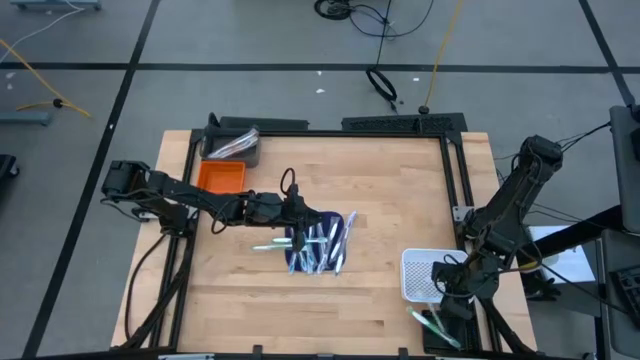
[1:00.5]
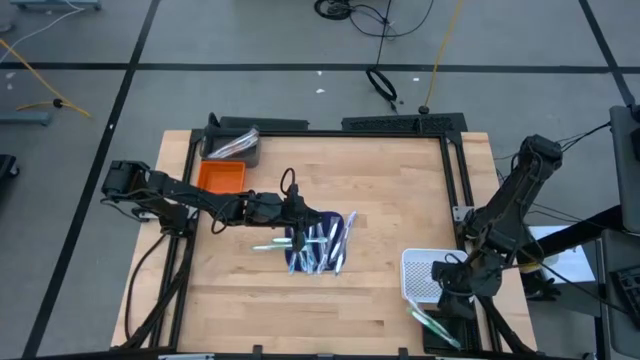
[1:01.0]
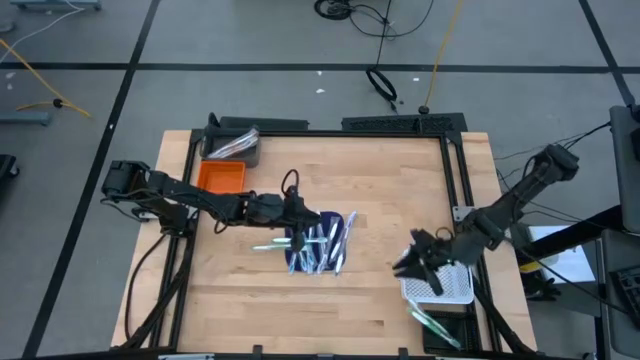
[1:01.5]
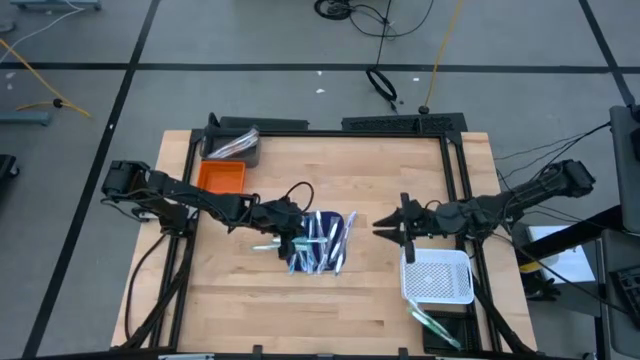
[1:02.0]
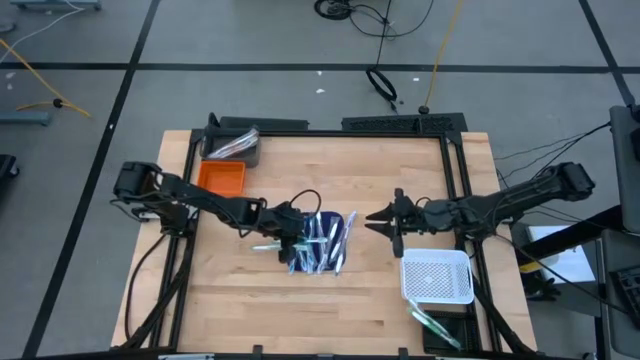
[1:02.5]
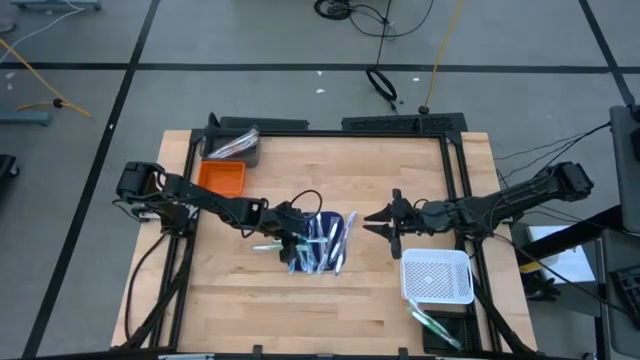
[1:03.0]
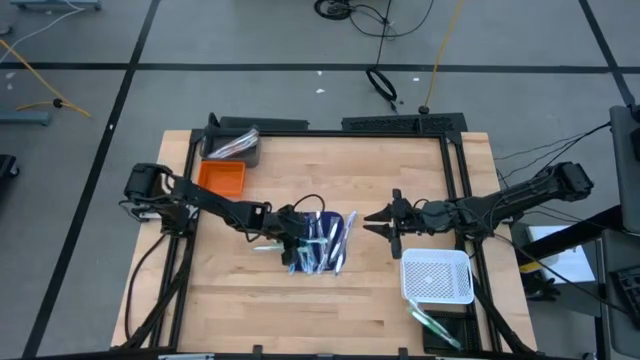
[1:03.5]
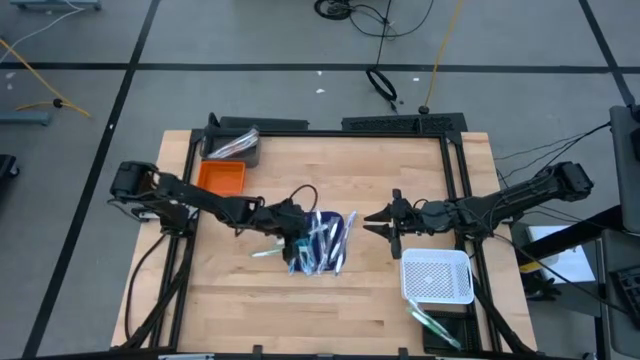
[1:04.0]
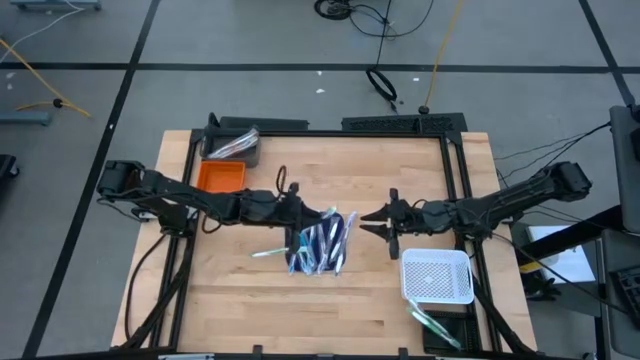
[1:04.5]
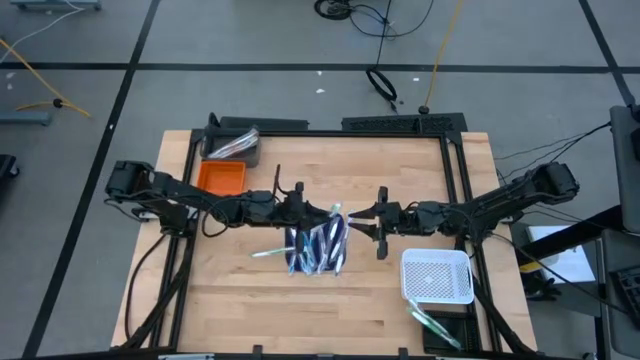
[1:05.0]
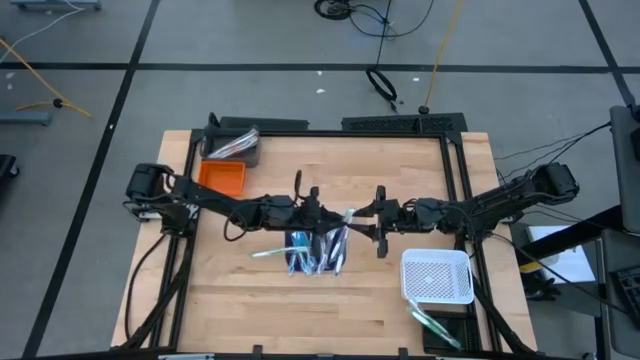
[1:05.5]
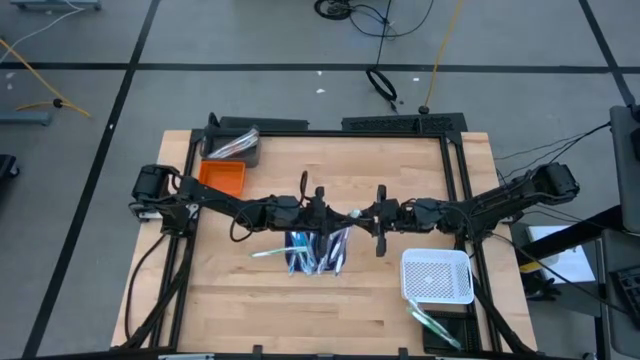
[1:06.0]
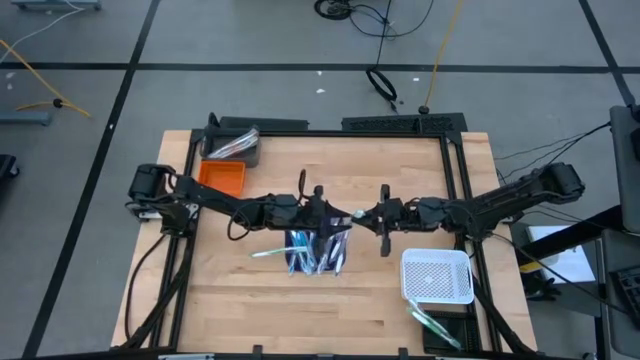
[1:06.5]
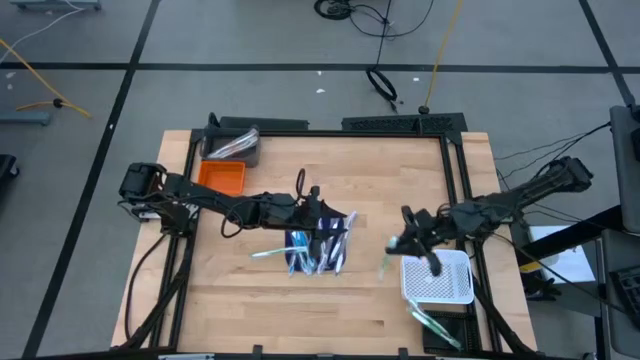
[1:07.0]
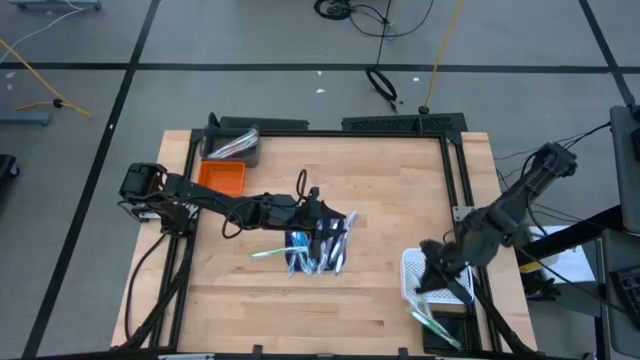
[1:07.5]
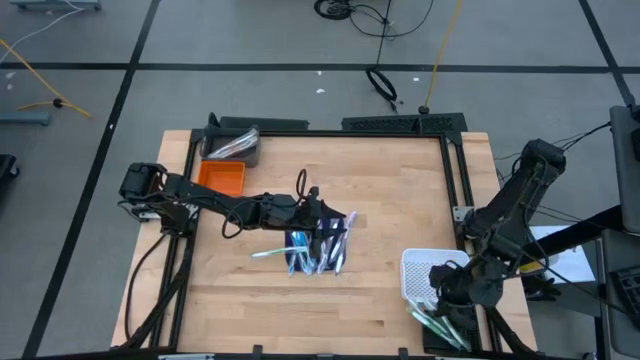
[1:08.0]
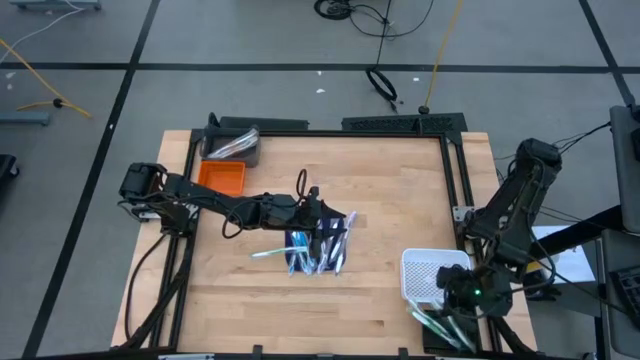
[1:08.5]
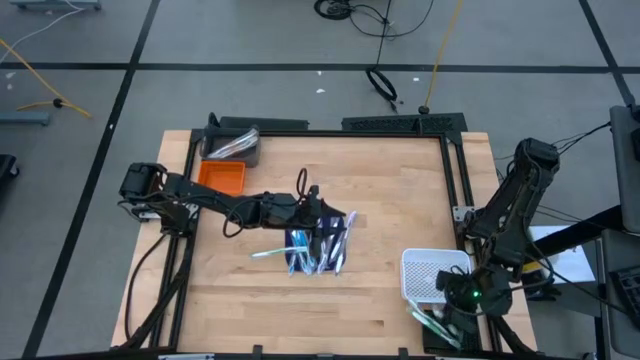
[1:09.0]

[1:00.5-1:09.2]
Task: Pick & Place Toothbrushes
Put the green toothbrush into the black bin

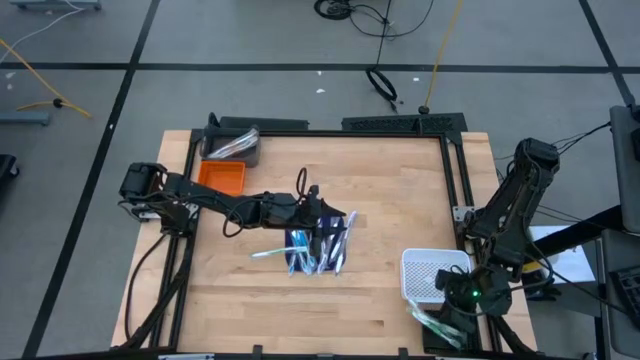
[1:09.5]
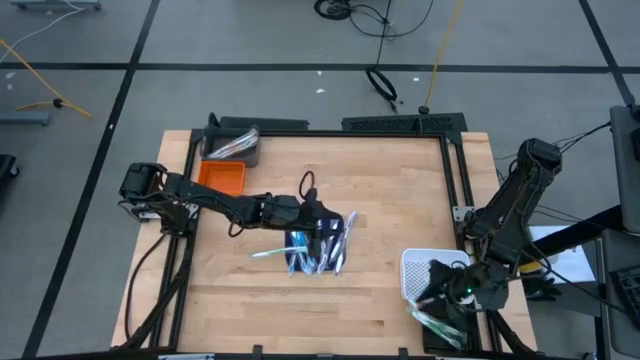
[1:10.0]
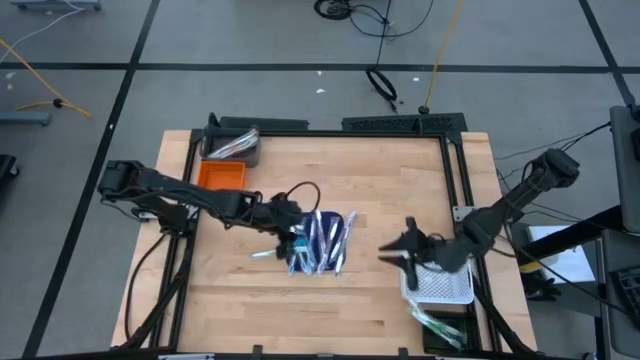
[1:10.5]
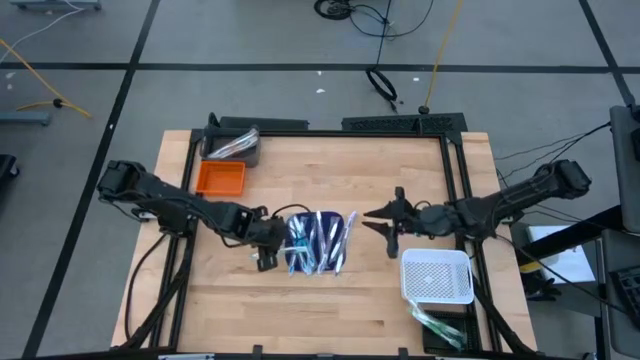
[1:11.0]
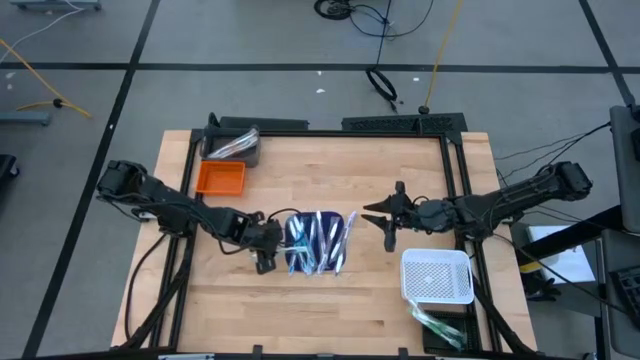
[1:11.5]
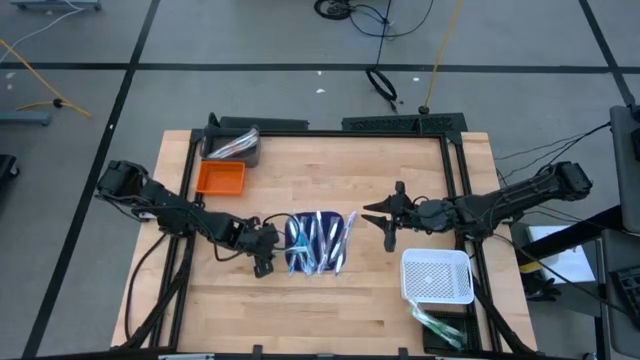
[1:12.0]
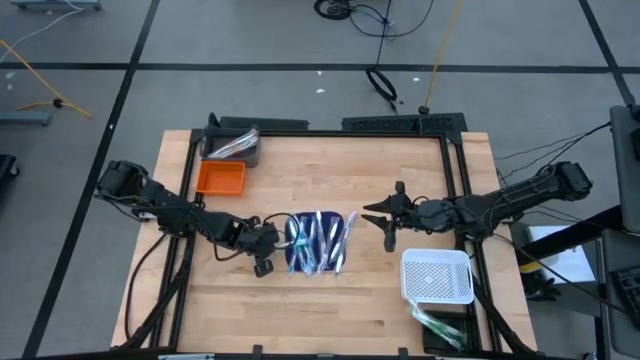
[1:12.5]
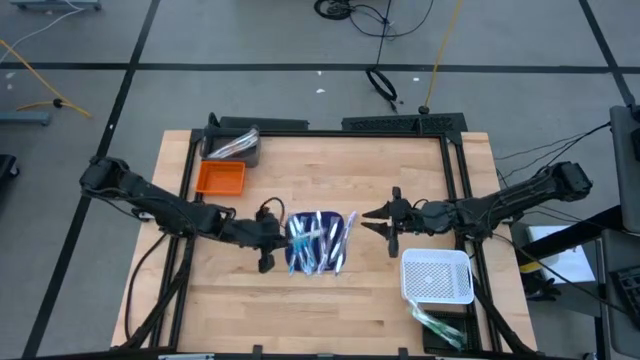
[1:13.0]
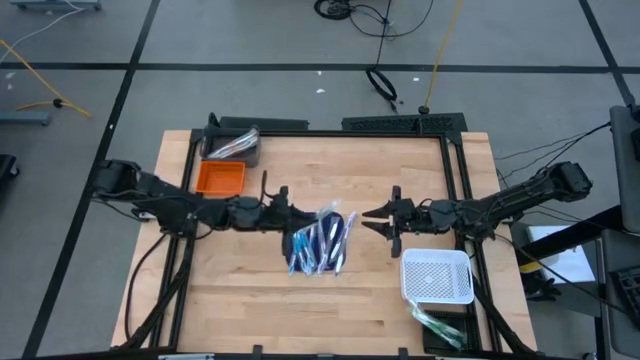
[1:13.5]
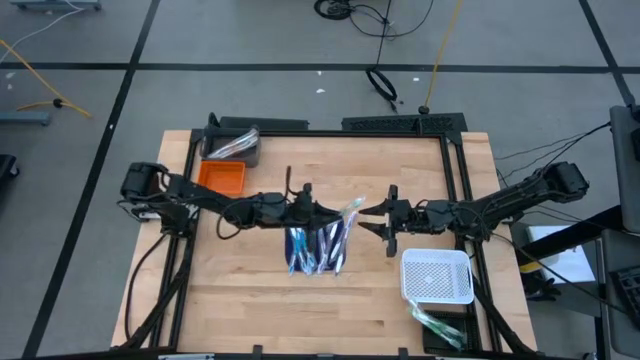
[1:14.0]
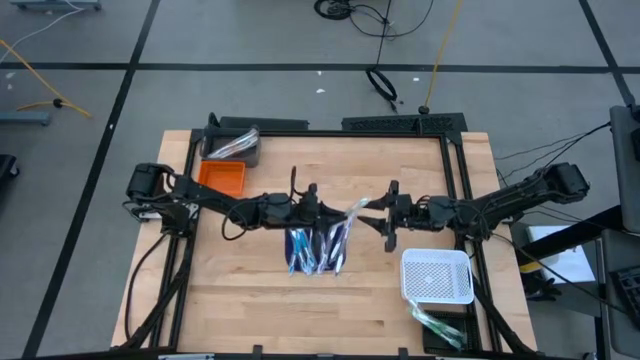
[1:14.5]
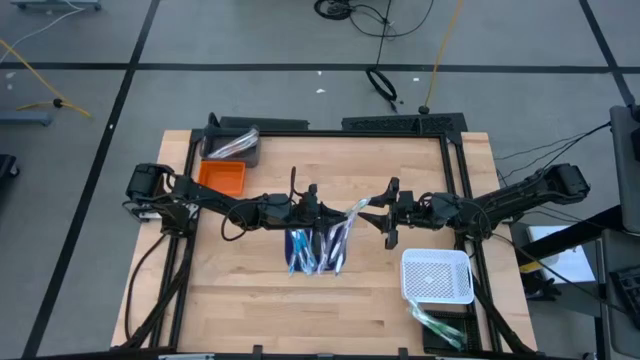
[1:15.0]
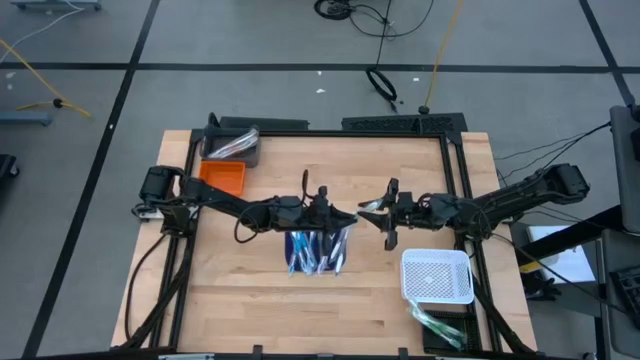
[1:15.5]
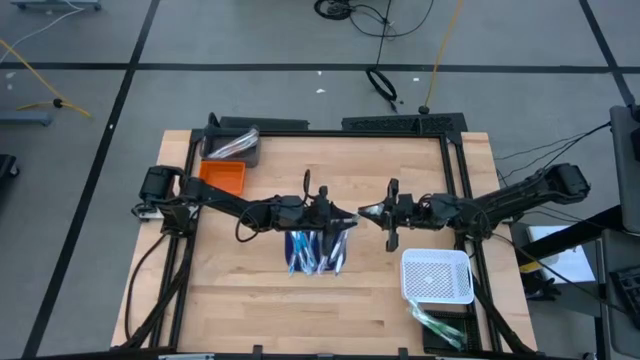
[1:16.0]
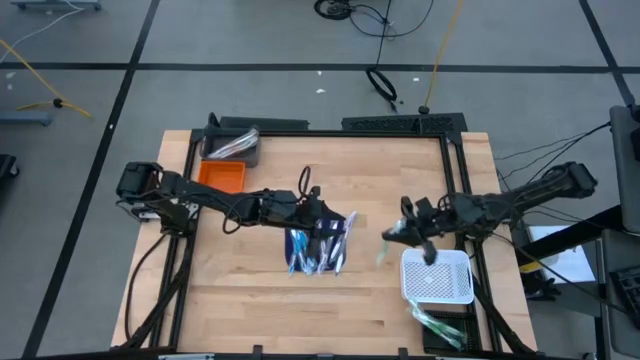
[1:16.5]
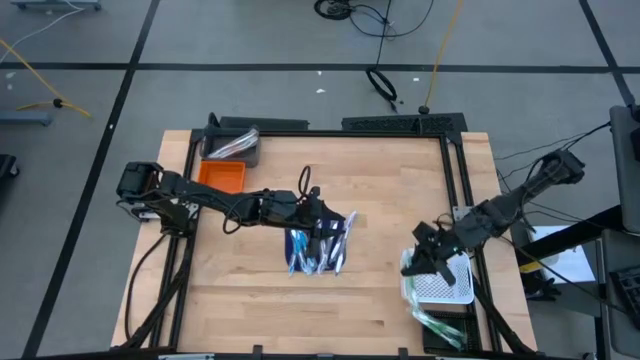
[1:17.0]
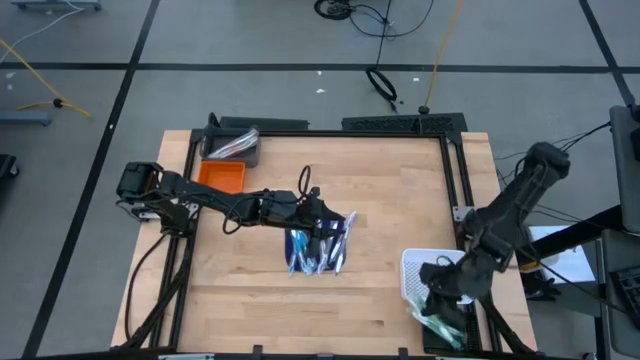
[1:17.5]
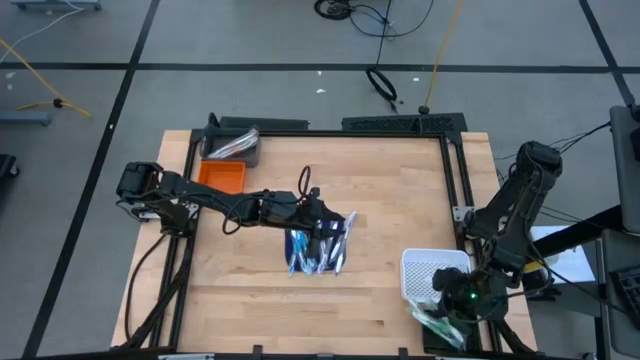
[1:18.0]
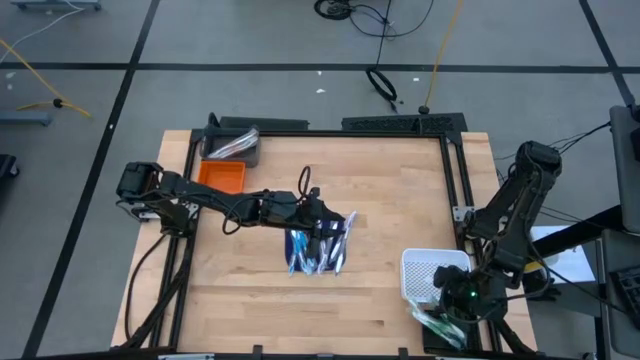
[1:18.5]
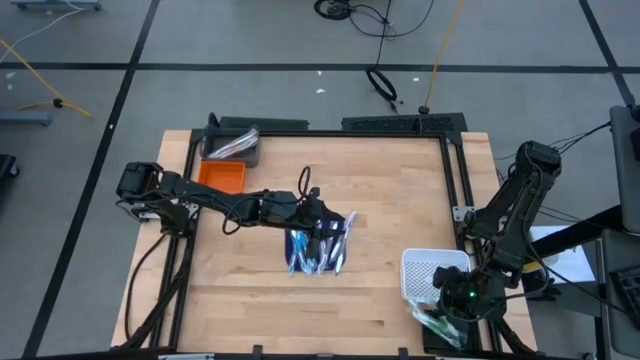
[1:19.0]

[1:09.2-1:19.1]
Put the green toothbrush into the black bin

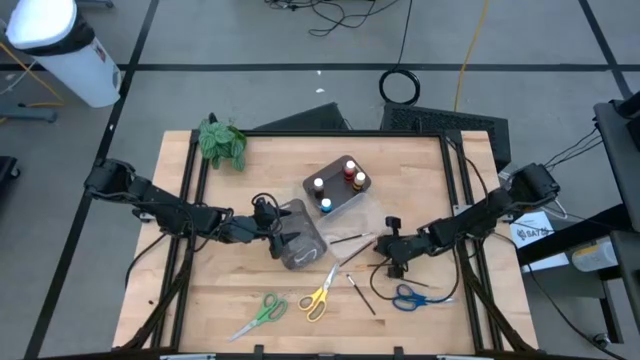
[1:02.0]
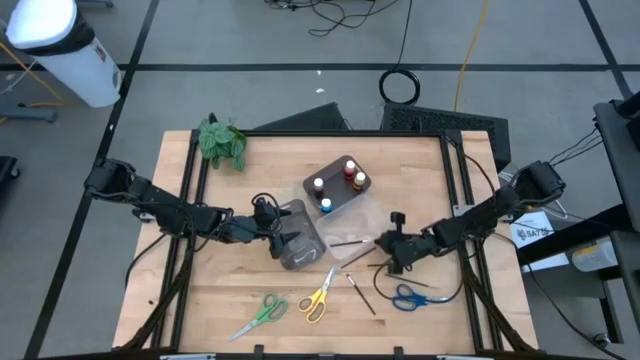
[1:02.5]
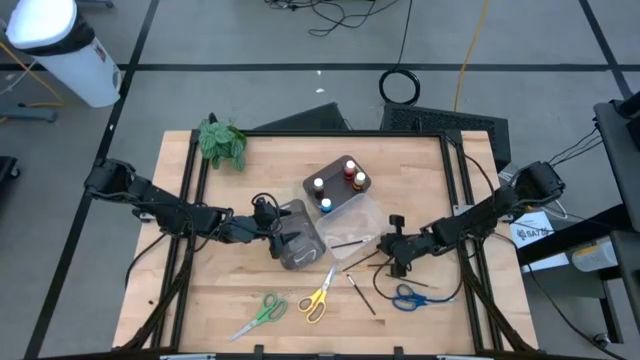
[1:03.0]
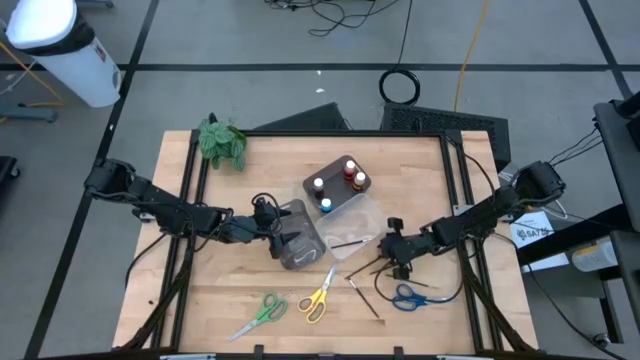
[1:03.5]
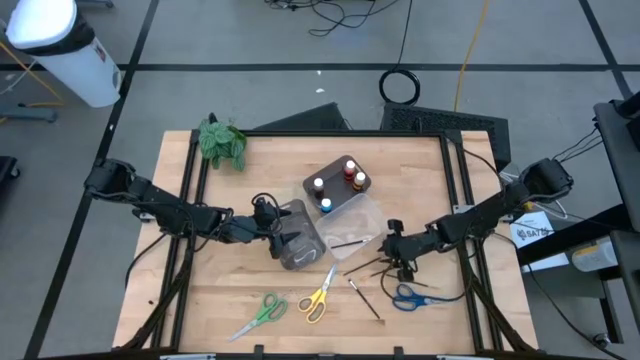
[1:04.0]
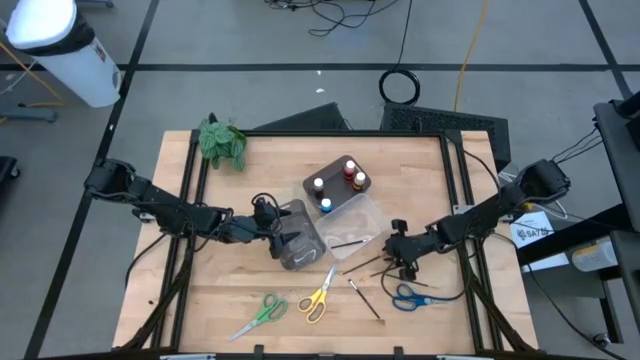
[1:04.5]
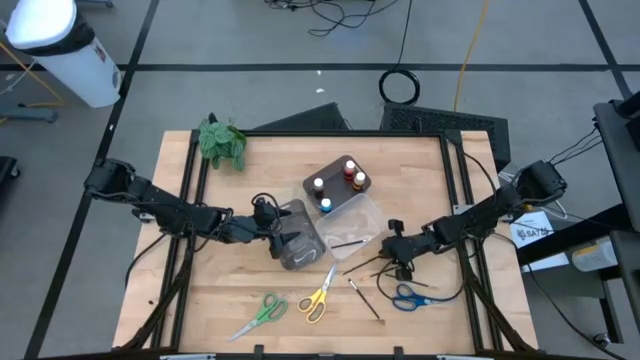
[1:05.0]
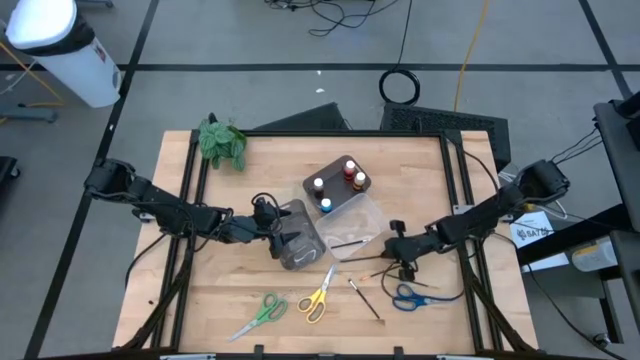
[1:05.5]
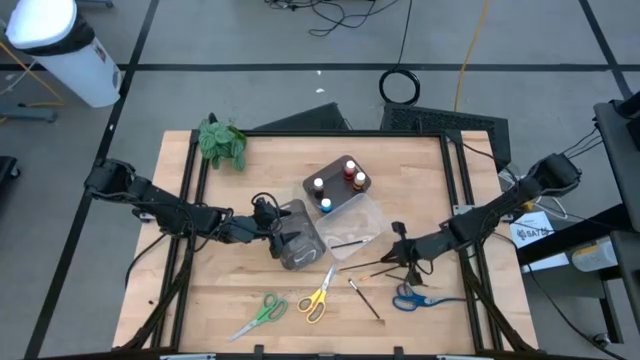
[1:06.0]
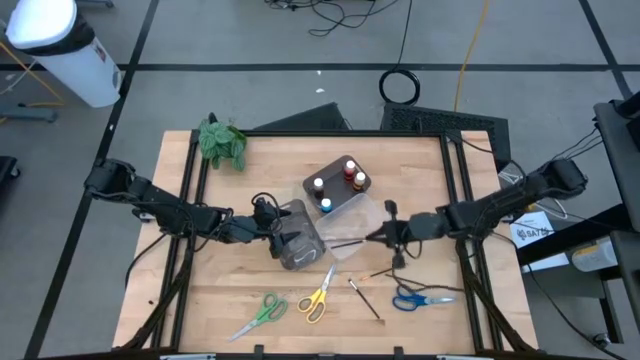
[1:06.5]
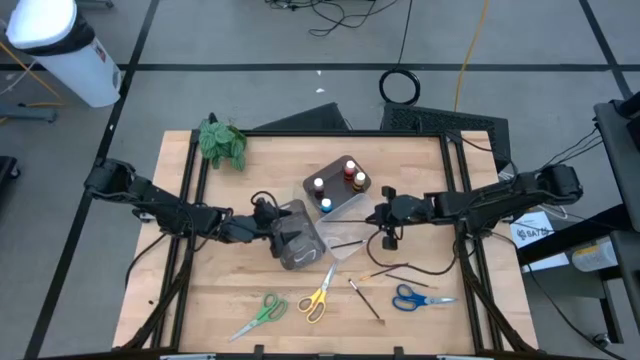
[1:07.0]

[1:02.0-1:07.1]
Task: Pick & Place Paint Supplies
Put the top gold paintbrush into the transparent bin
